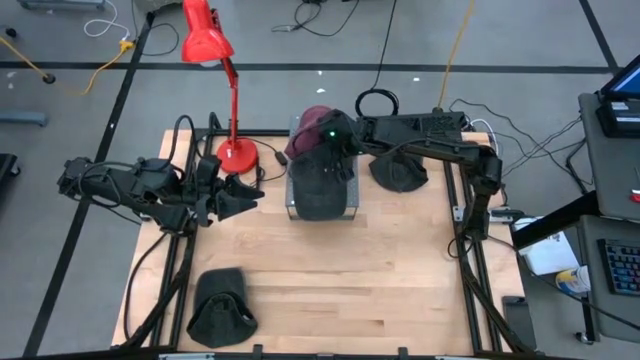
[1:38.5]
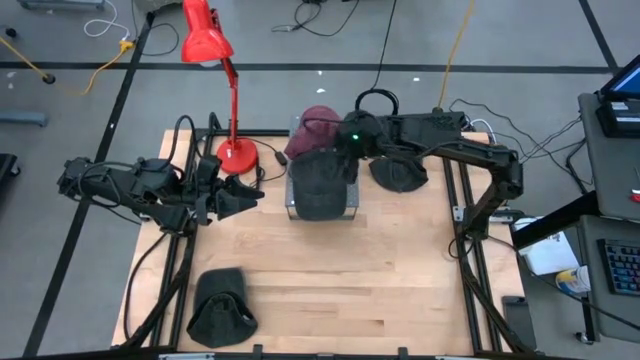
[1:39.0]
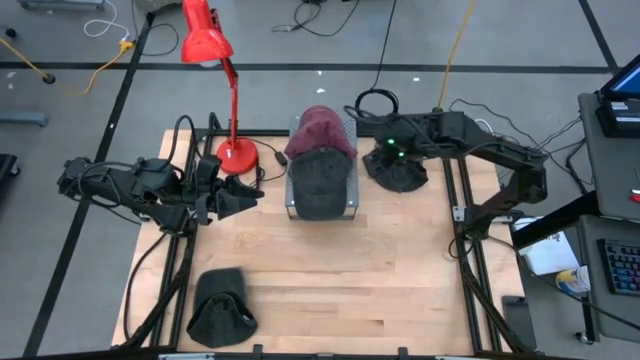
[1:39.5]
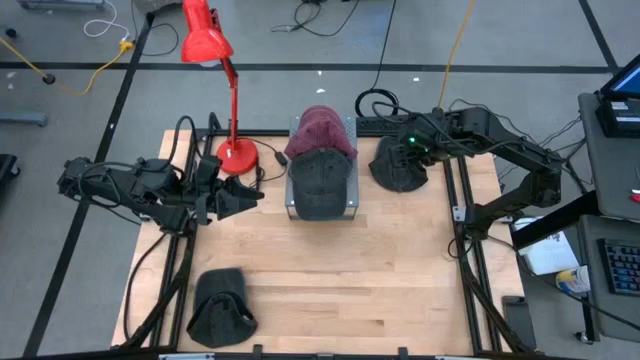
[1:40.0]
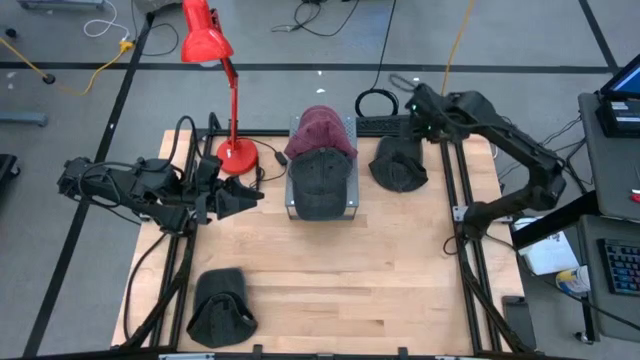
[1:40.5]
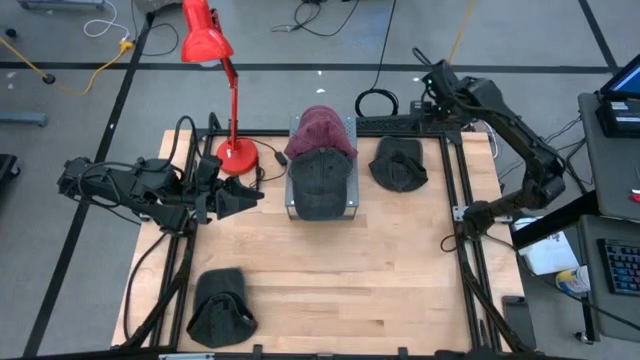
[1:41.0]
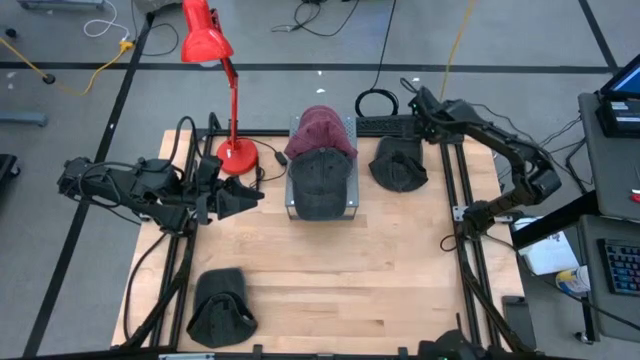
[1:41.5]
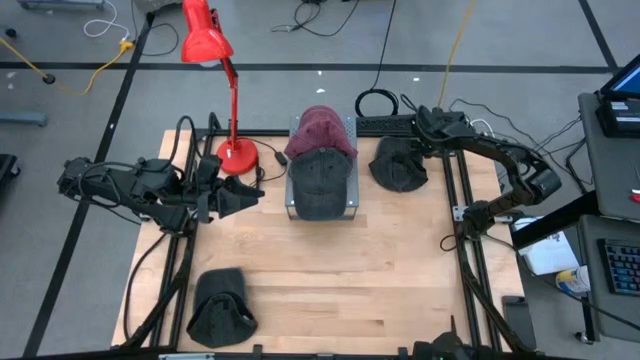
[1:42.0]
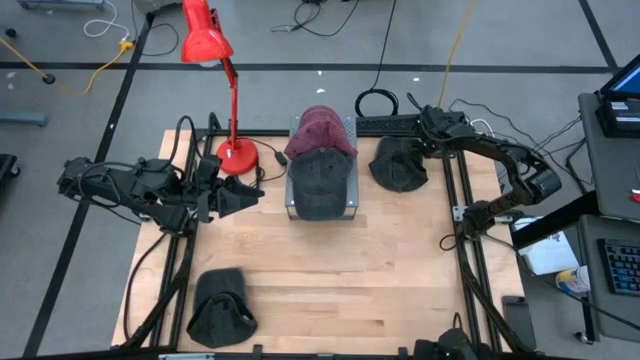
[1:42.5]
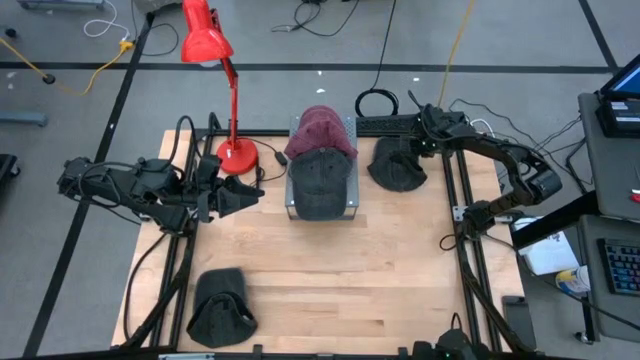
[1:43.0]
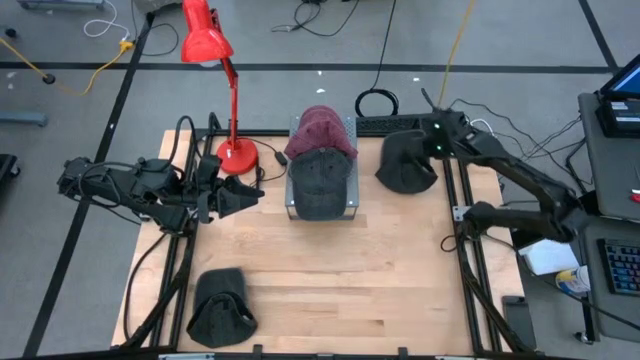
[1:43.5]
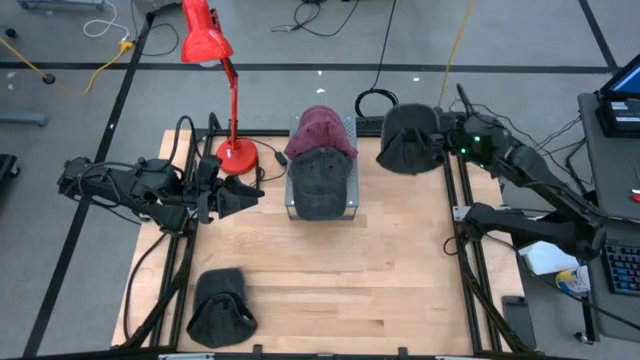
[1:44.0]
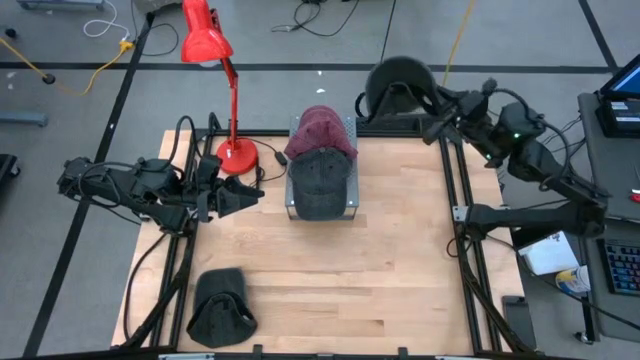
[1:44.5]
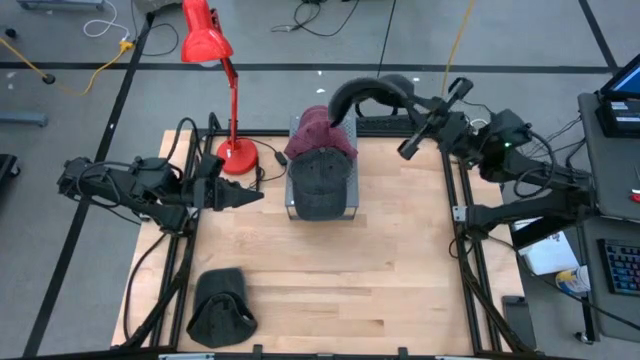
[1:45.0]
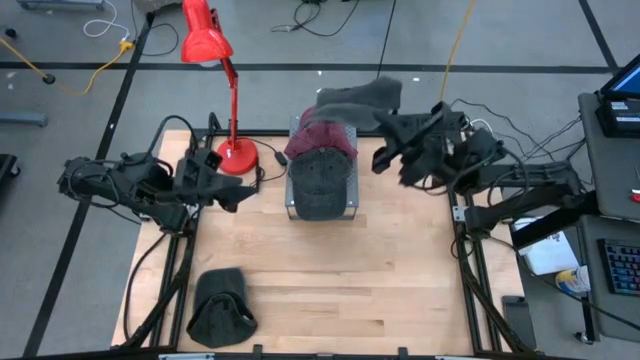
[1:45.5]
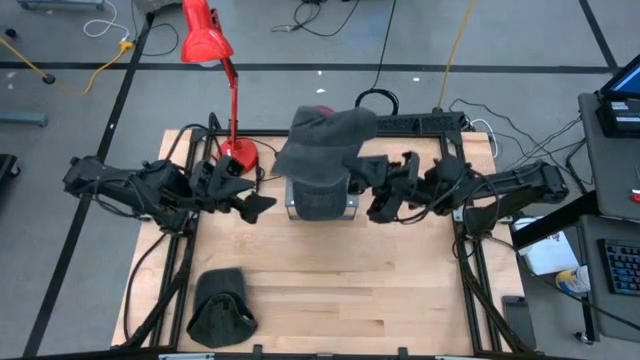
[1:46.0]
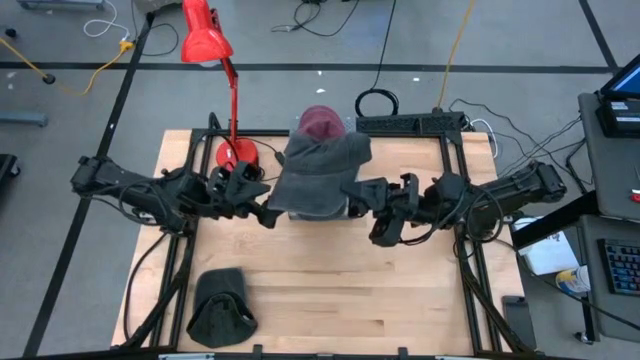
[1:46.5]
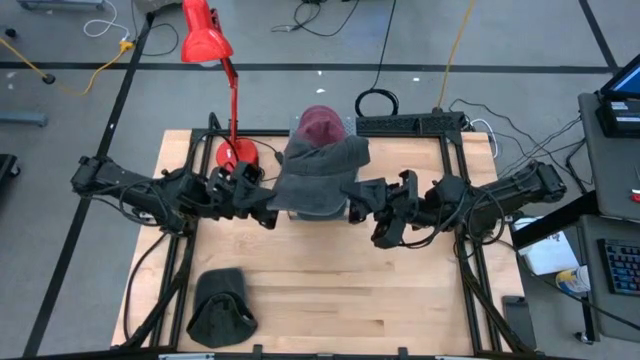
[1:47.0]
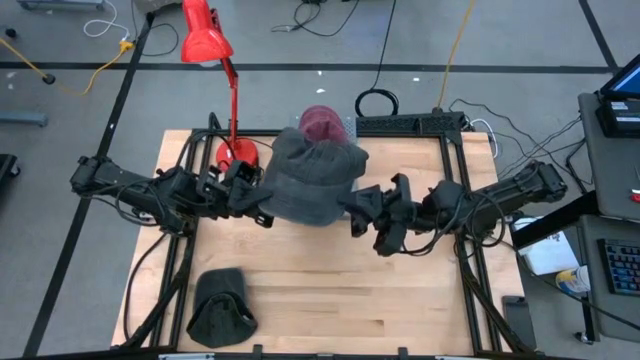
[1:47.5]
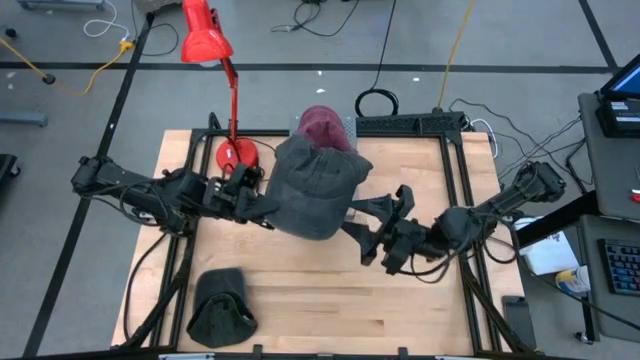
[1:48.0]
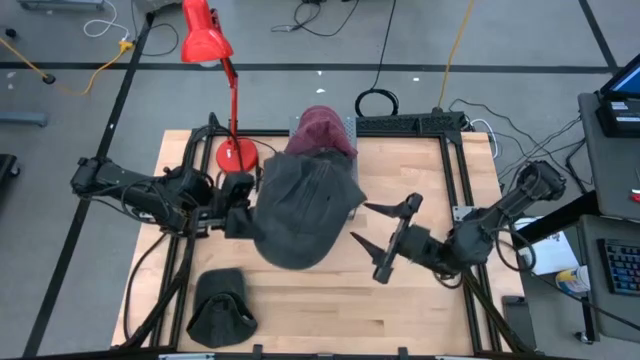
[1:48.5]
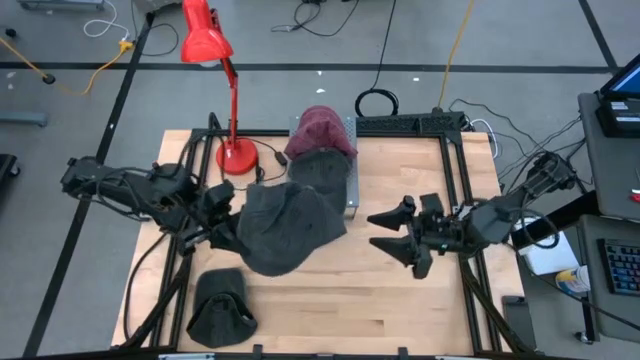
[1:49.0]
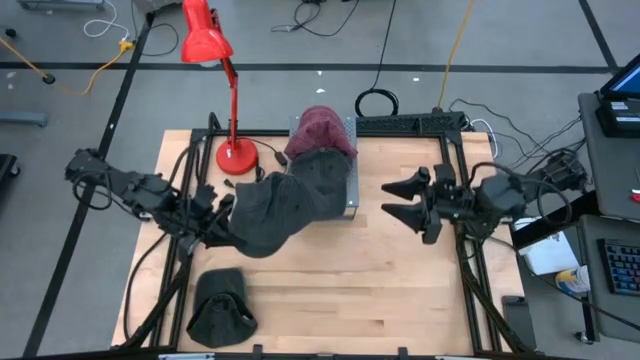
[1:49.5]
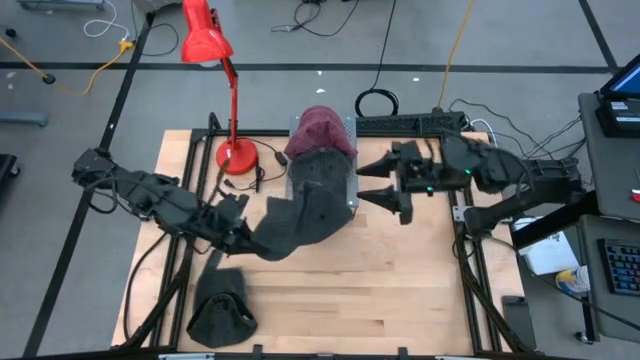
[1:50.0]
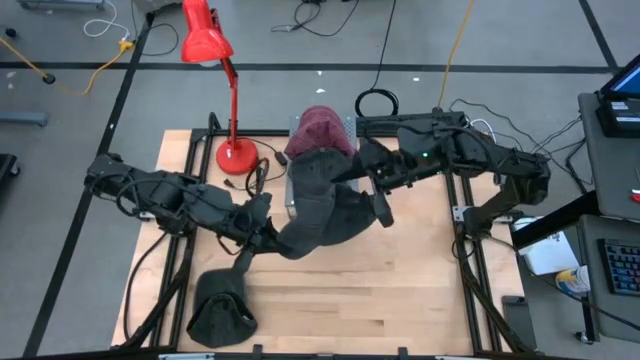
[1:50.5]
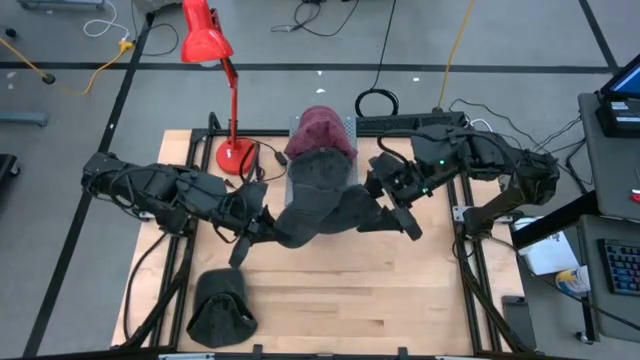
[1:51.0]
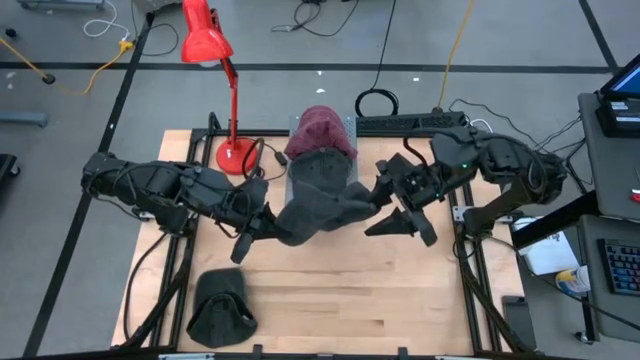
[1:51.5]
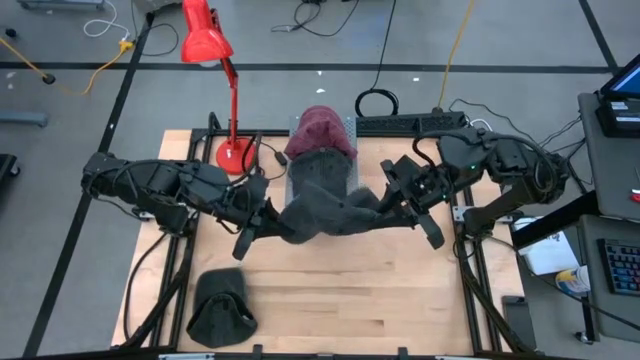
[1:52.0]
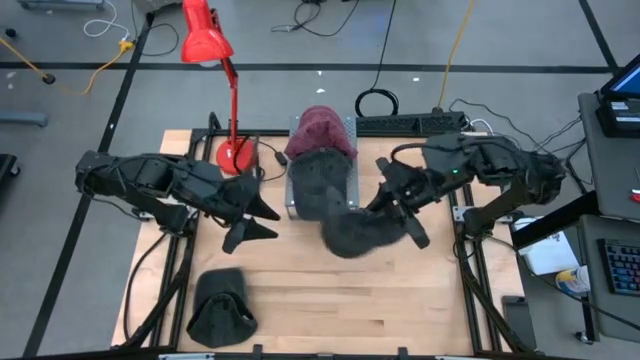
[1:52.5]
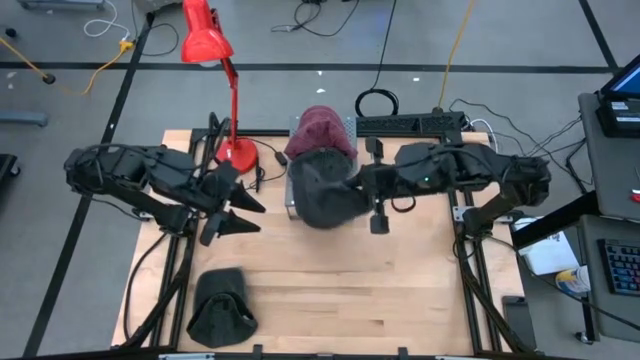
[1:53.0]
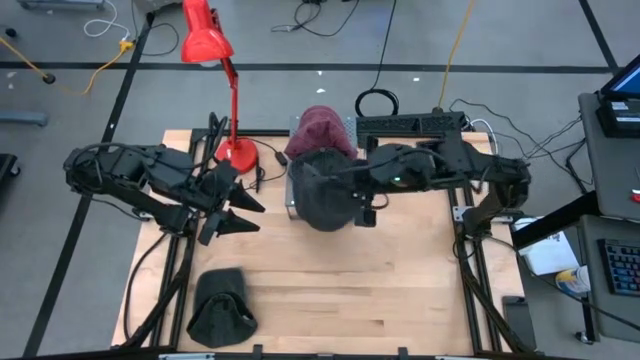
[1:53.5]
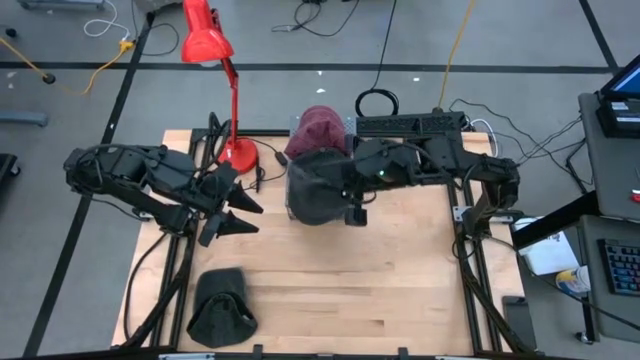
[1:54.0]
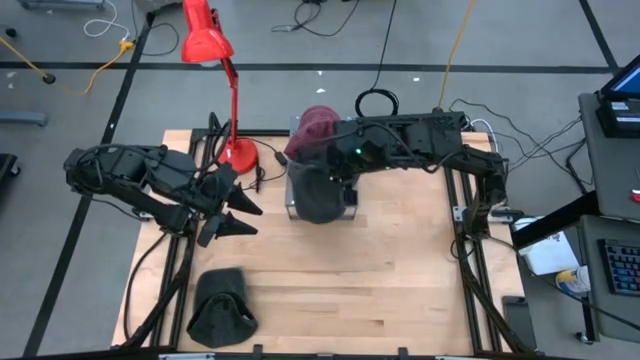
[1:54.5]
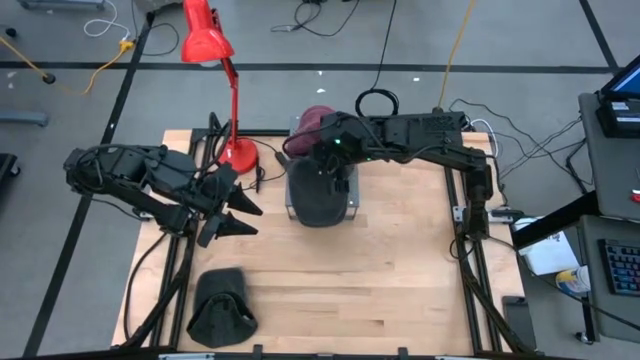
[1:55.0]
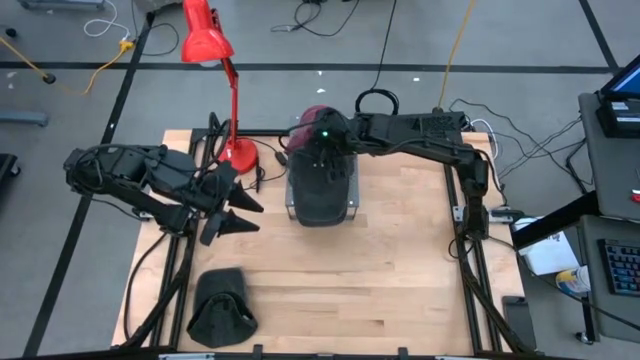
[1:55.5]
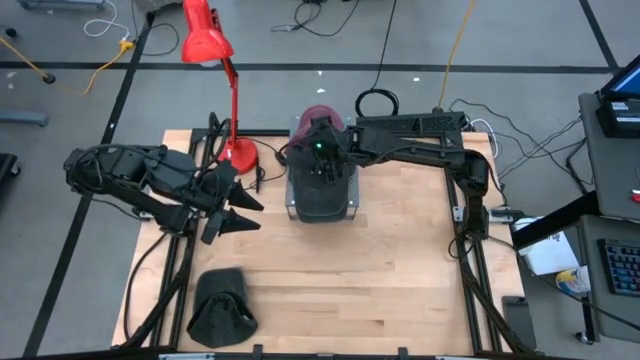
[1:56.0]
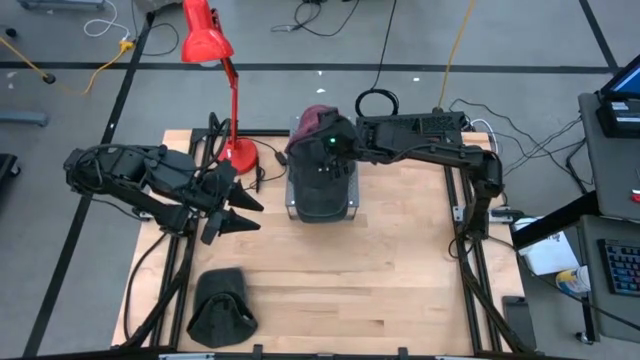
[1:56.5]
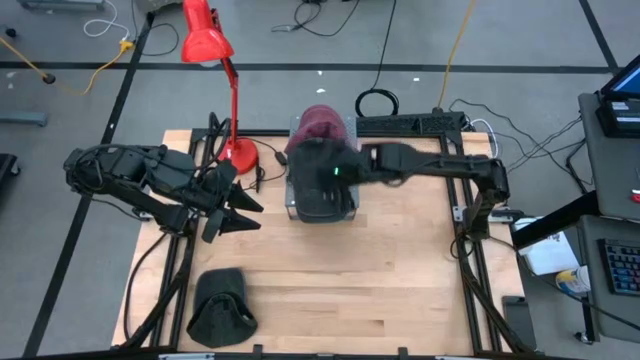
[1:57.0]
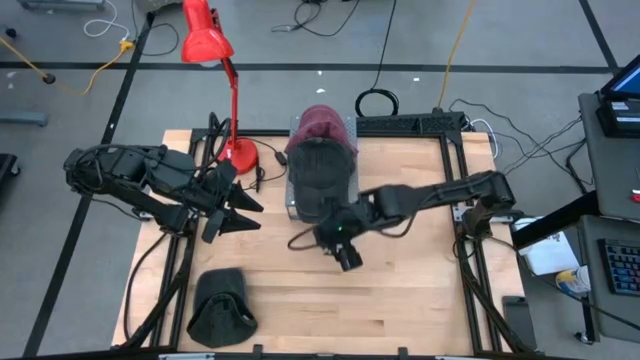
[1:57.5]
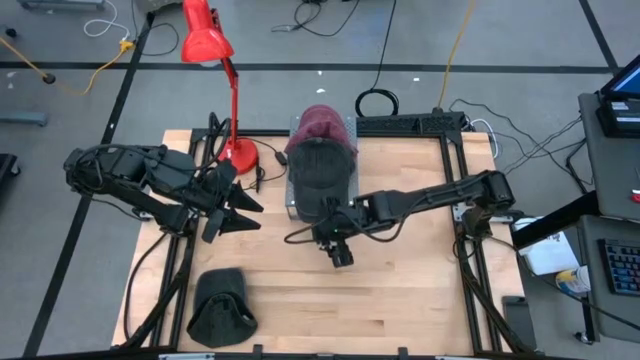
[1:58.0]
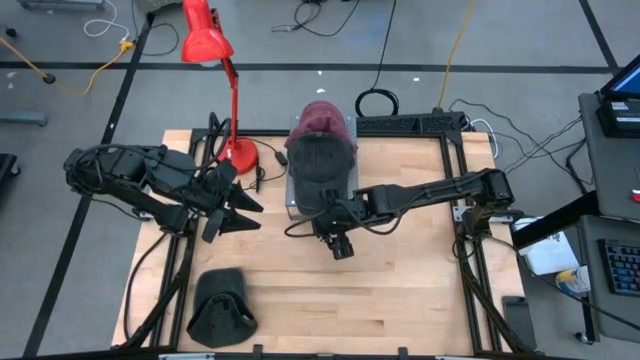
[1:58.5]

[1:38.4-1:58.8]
Task: Pick & Place hat
Stack the top black cap on top of the black cap on the shelf

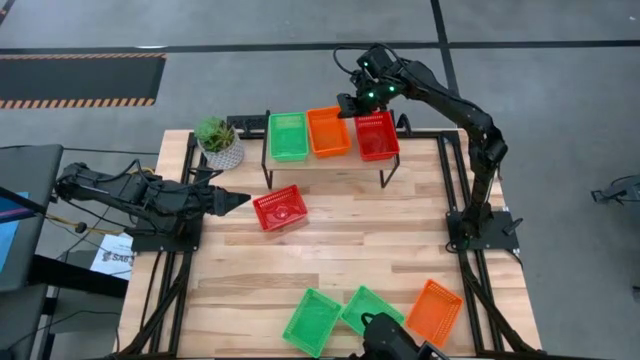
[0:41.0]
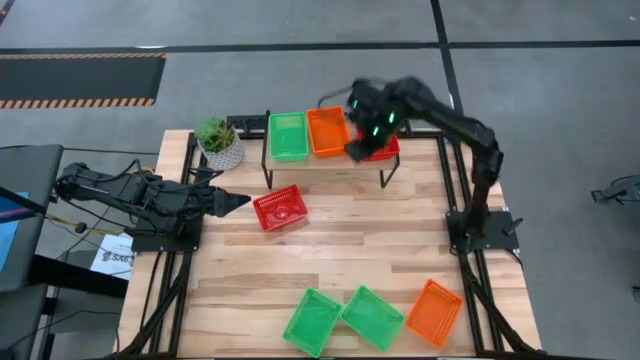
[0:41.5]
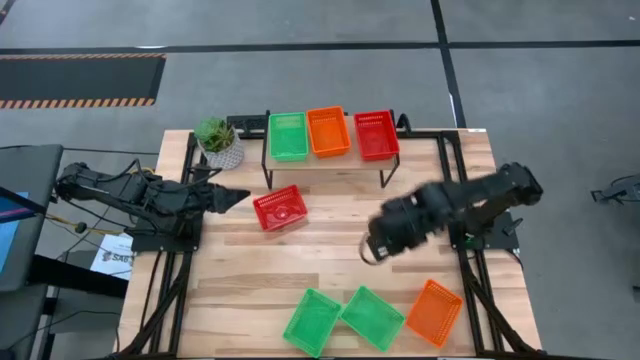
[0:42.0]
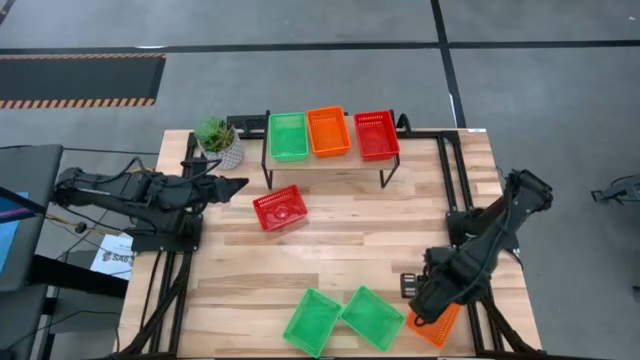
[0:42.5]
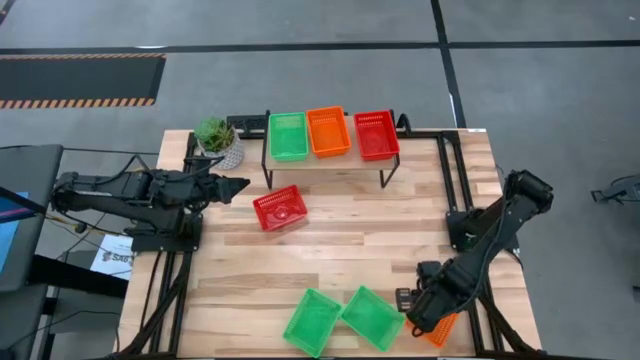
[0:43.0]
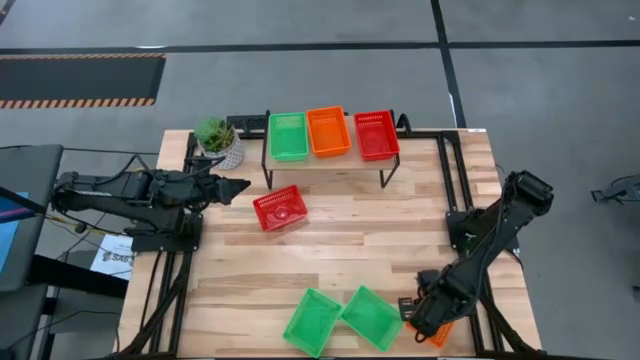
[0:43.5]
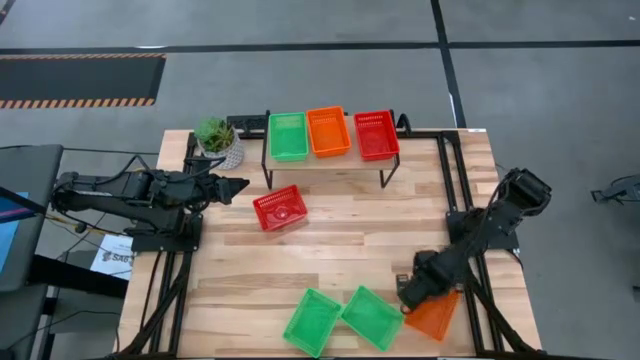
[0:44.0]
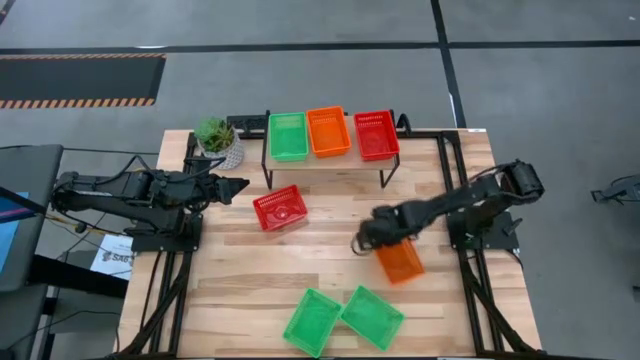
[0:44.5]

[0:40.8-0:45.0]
Task: Stack baskets on shelf by color
Move the orange bin to the center of the table
